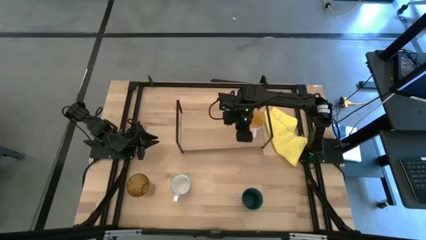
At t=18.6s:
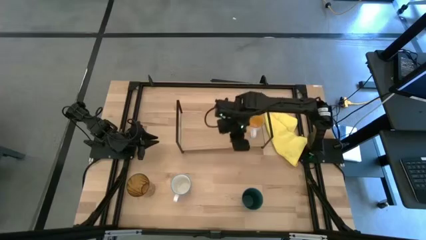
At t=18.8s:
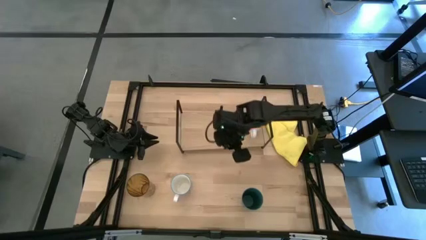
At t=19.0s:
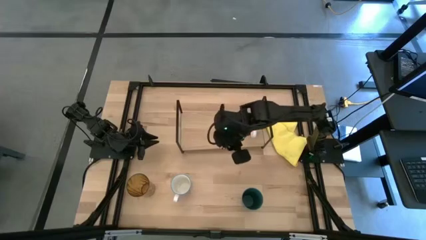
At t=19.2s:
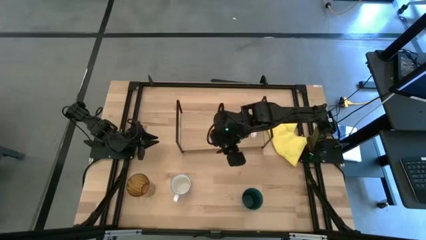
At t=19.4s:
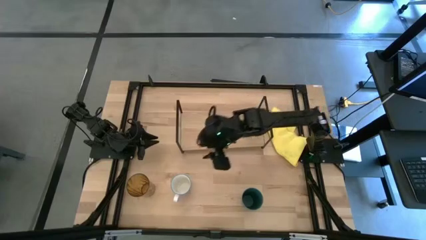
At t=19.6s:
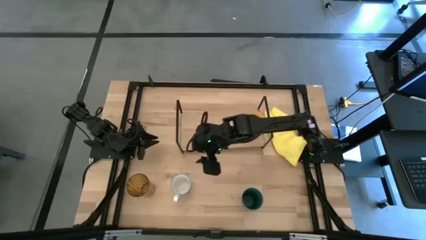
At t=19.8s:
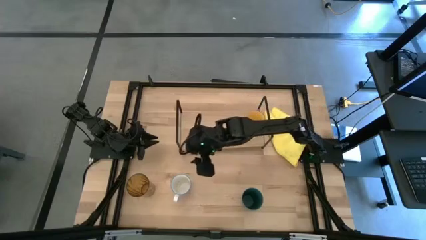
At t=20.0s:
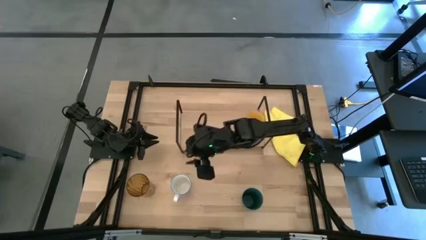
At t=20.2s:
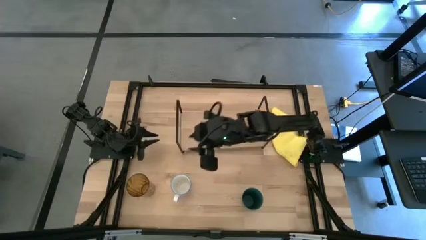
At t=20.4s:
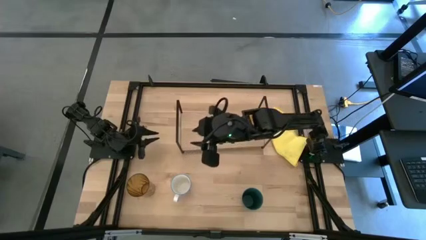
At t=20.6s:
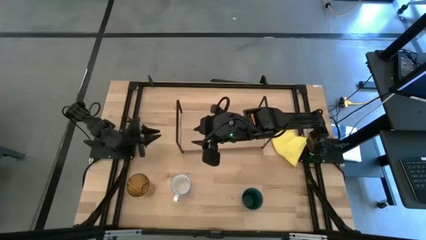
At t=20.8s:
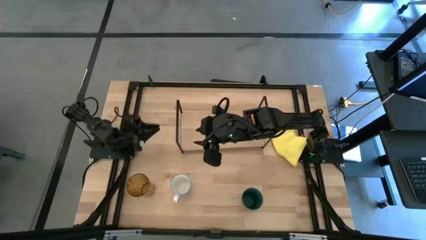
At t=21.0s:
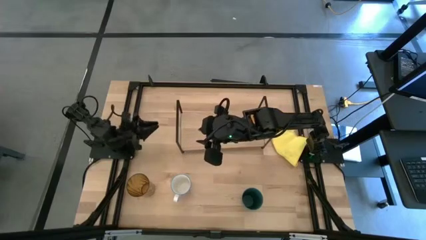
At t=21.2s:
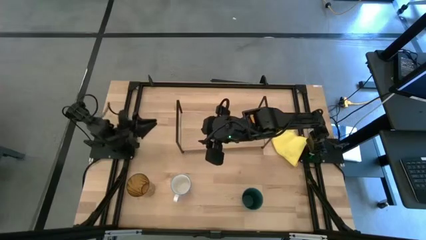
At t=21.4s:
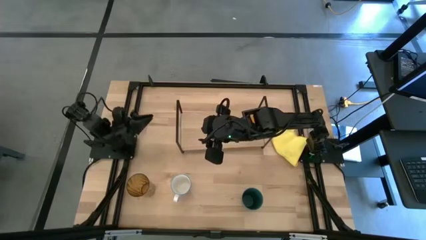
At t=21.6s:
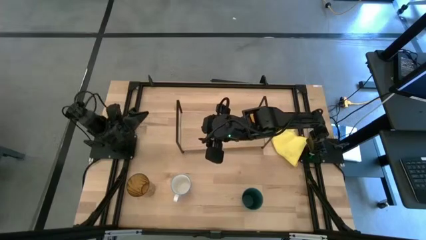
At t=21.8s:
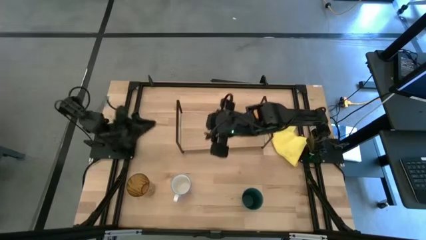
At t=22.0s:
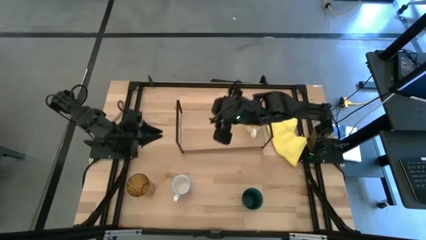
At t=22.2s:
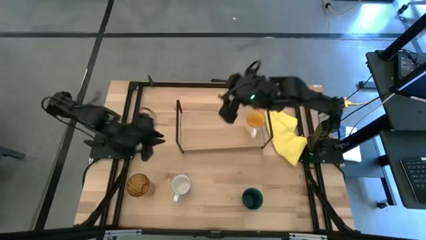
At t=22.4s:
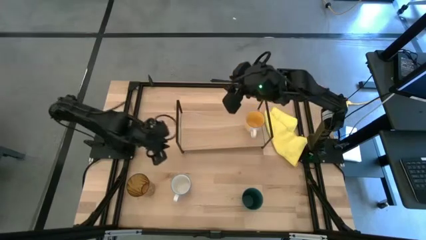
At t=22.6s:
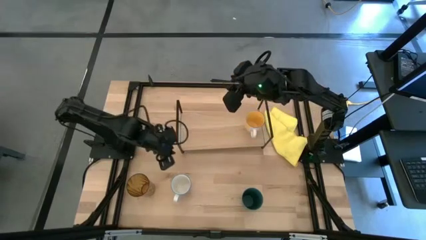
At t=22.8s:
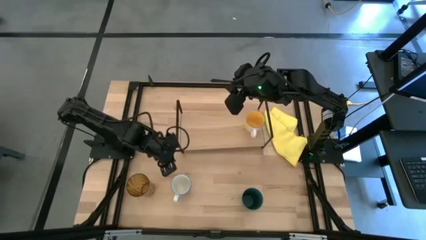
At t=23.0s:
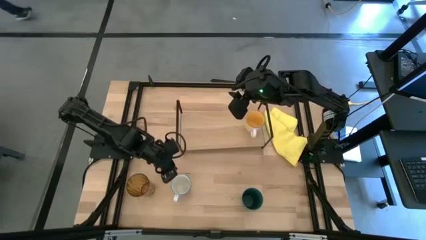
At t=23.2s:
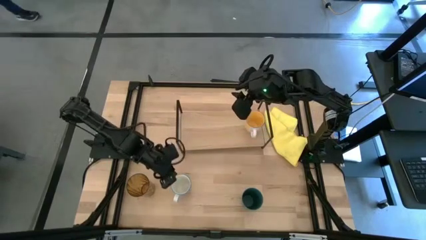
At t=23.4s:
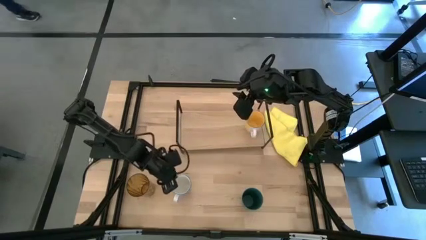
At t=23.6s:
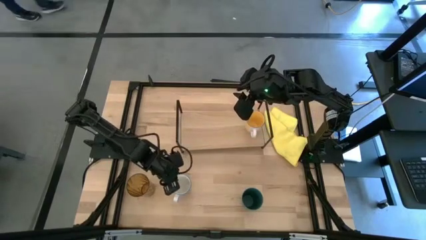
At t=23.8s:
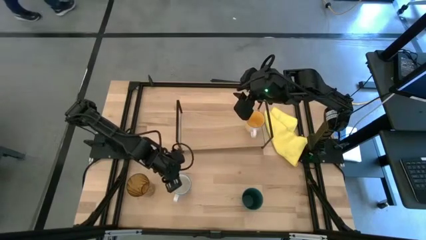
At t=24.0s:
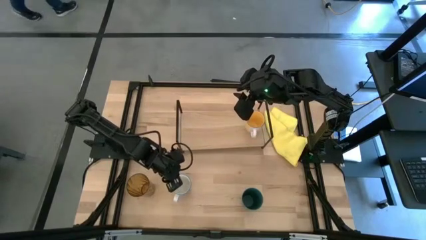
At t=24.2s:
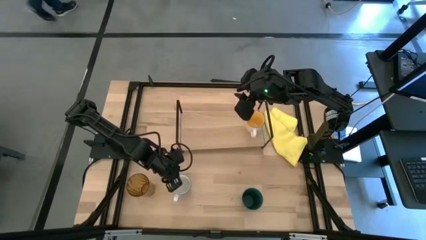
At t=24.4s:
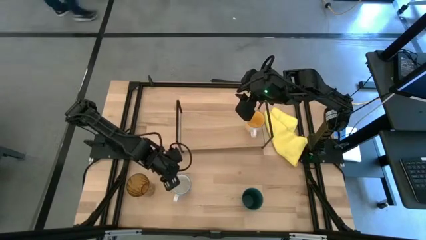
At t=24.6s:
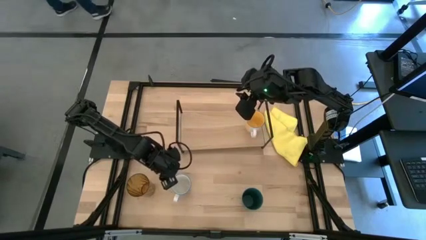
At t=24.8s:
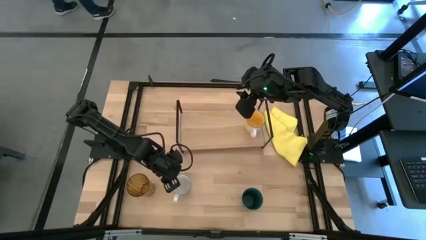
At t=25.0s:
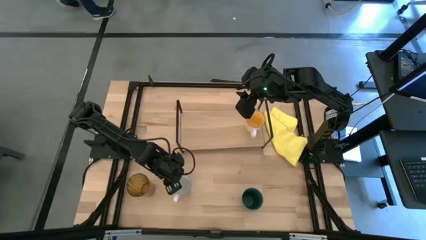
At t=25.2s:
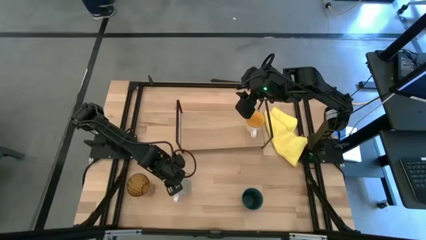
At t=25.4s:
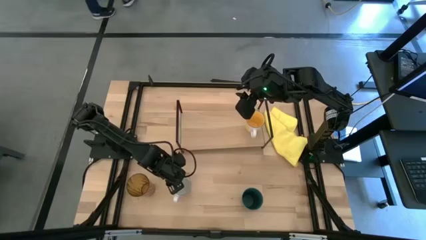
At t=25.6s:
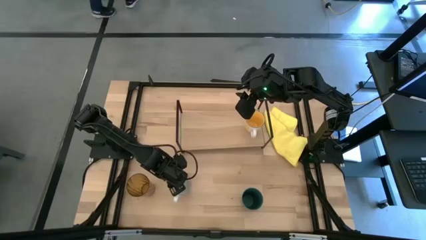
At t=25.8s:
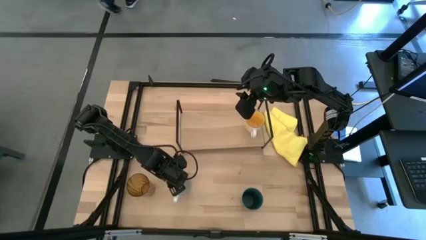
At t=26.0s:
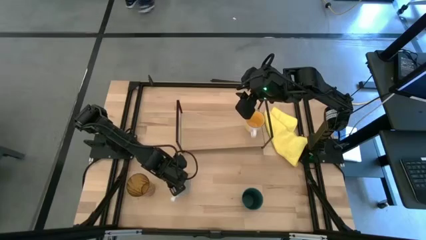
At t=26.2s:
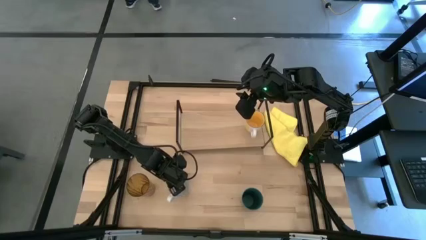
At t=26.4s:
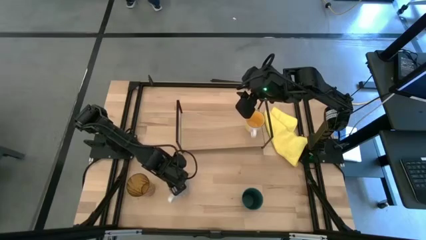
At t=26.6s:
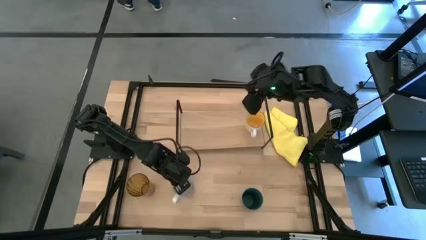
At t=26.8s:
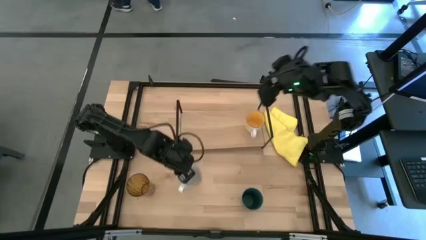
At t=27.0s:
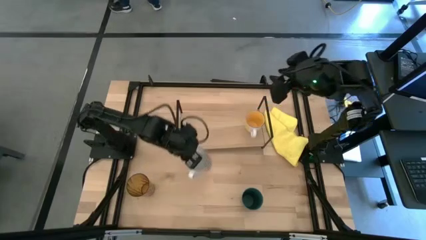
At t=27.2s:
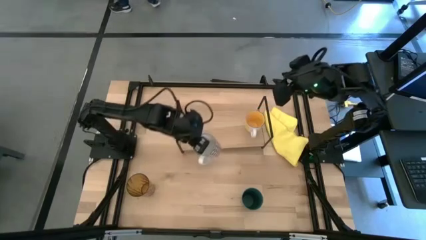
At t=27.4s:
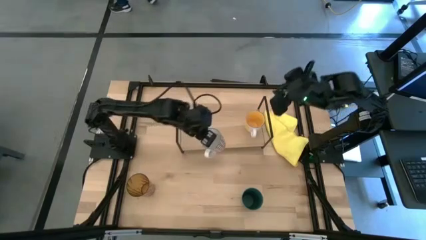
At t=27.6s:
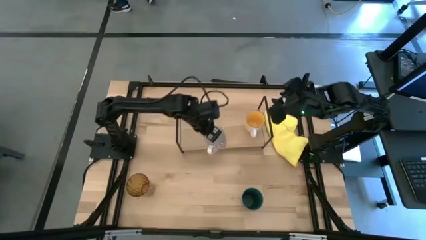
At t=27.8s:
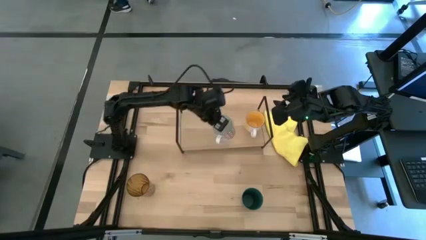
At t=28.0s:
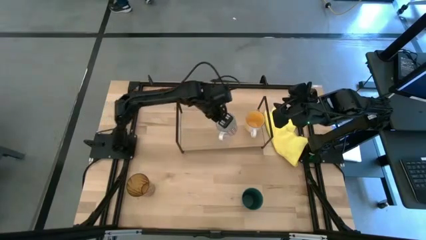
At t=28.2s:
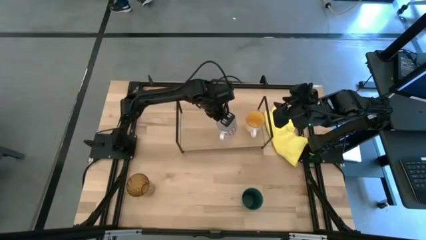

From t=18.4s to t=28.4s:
Task: Stack small to large cups/mugs on shelf
Put the red cup on the shelf
